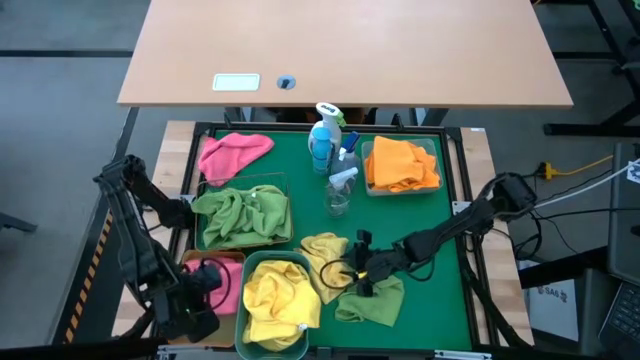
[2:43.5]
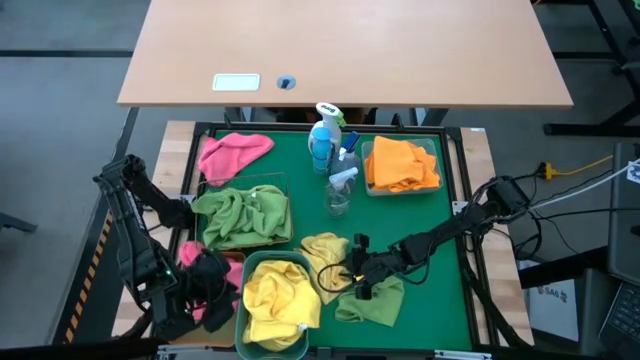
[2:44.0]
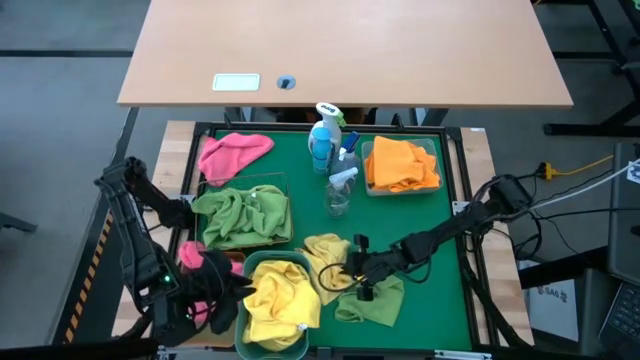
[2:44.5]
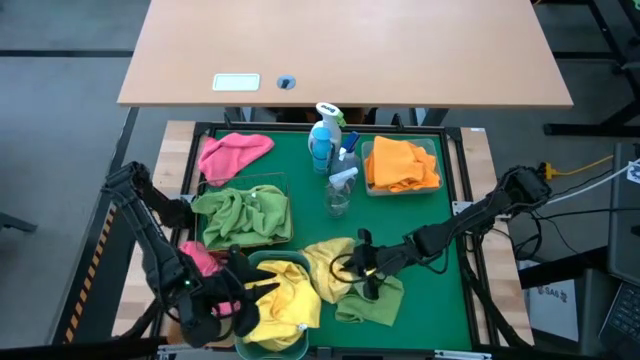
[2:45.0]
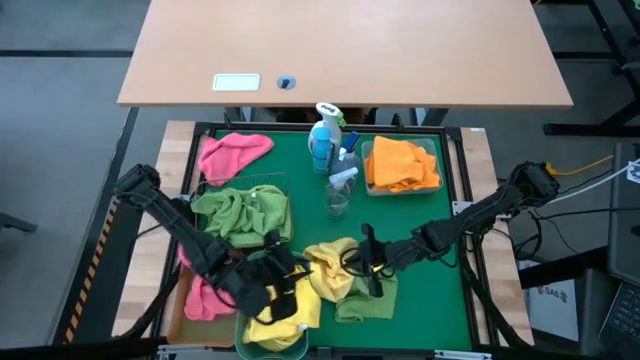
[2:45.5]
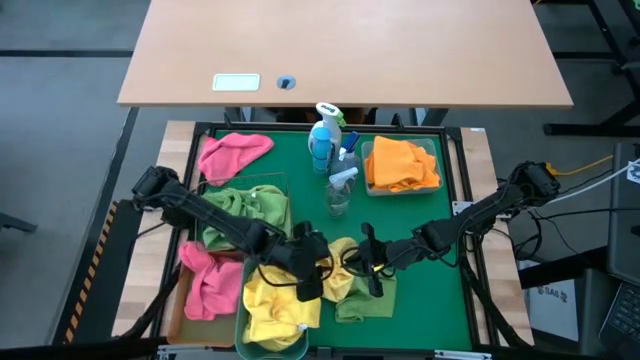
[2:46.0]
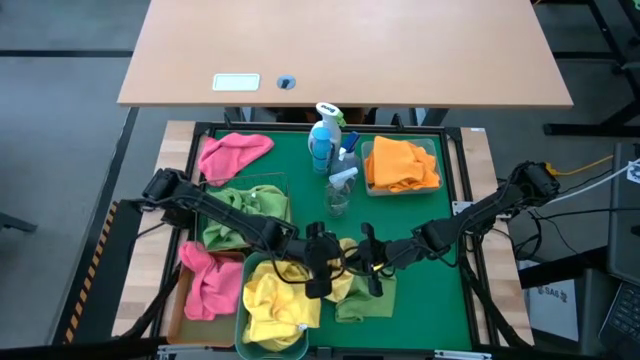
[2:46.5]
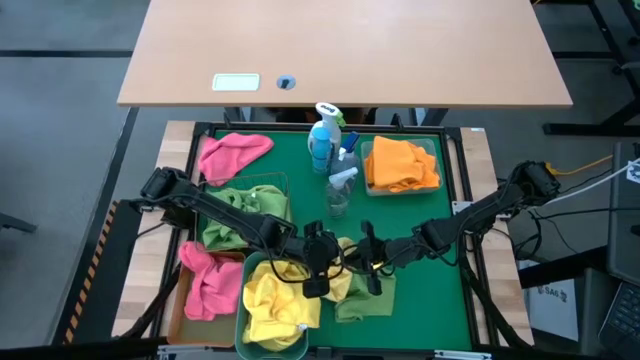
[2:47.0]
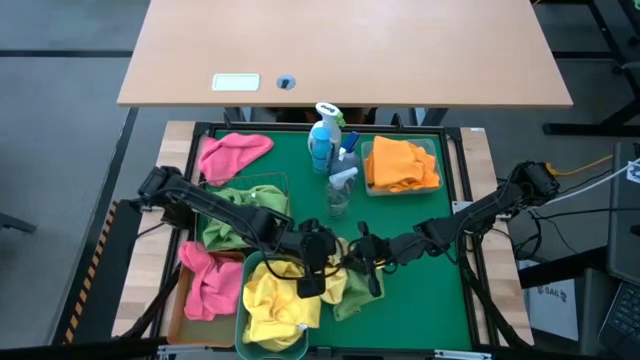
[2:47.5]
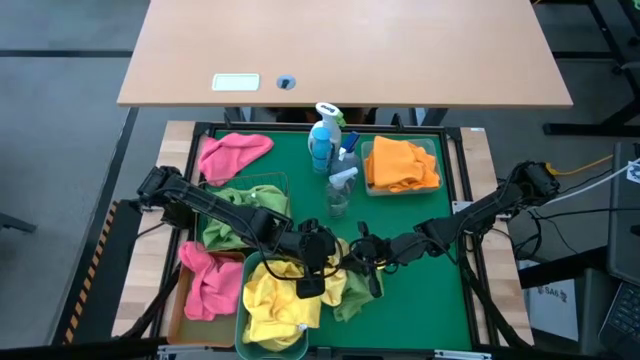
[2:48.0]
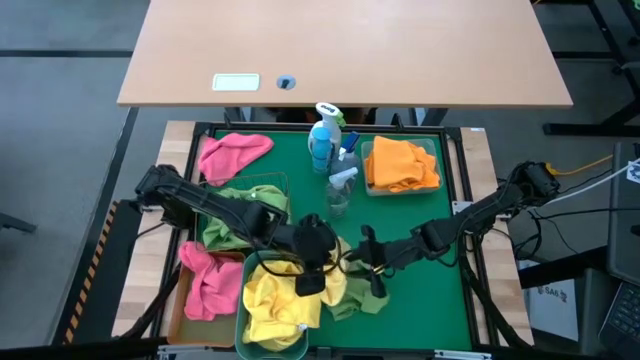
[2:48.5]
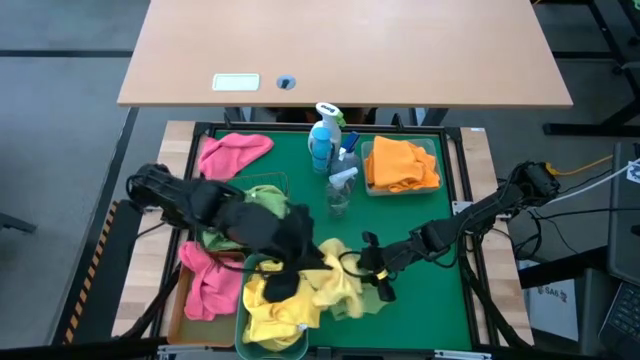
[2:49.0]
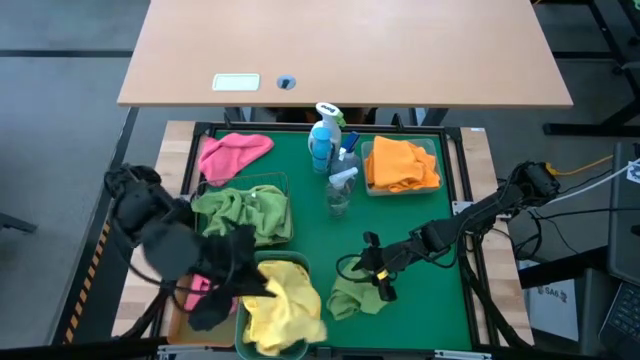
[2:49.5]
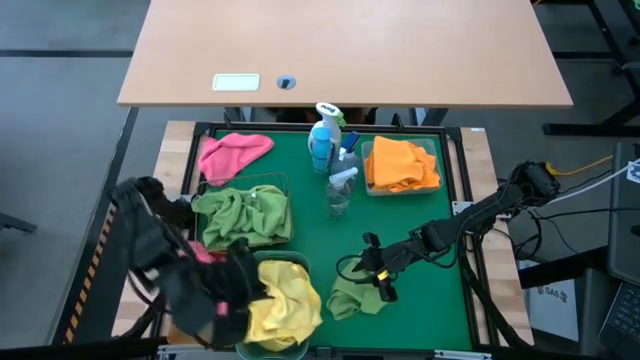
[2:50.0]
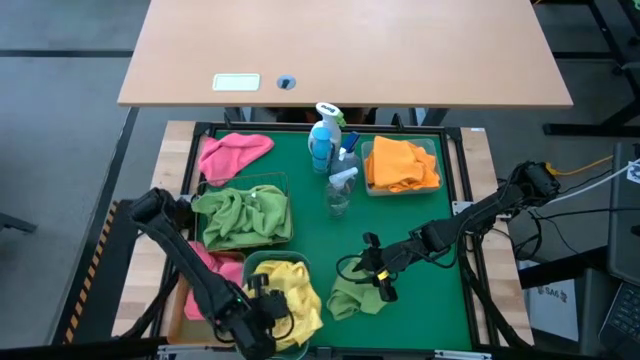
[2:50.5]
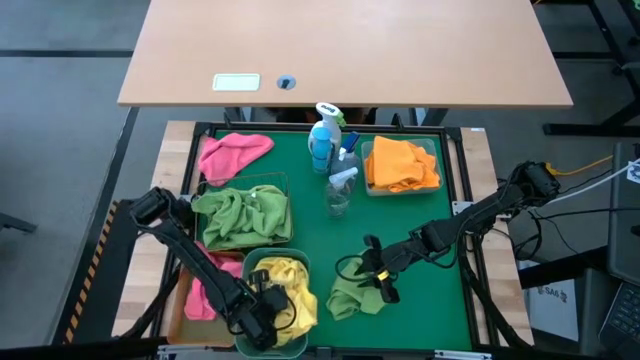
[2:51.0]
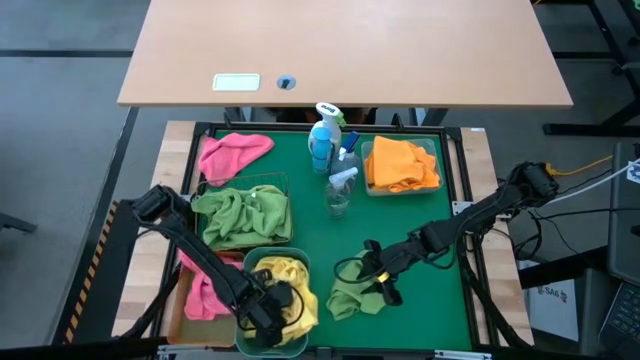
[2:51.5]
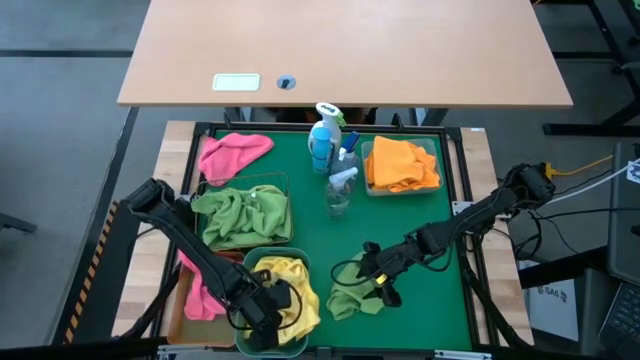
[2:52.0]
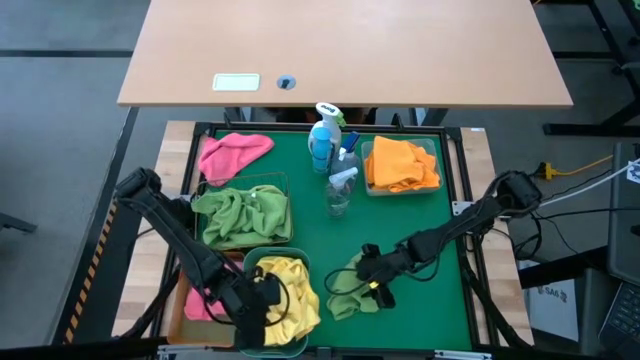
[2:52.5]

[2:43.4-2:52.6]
Task: Sort microfiber towel by color & place in baskets
Put the yellow towel into the blue bin

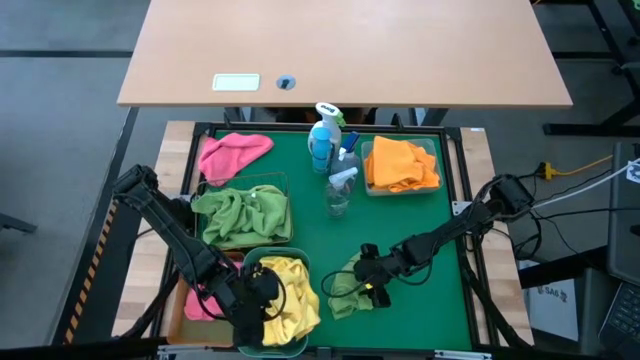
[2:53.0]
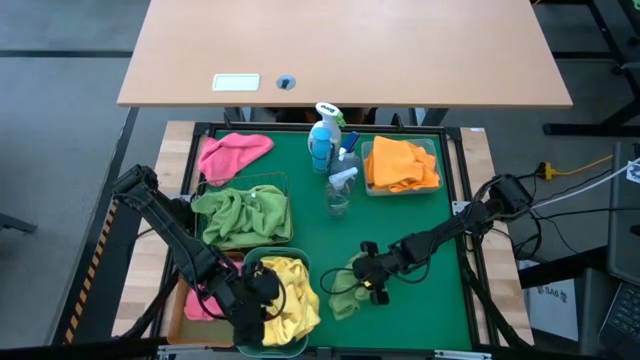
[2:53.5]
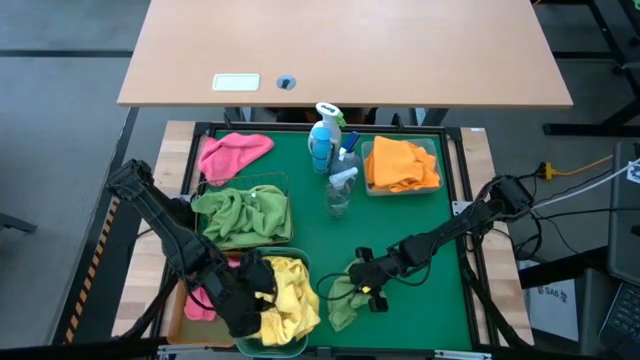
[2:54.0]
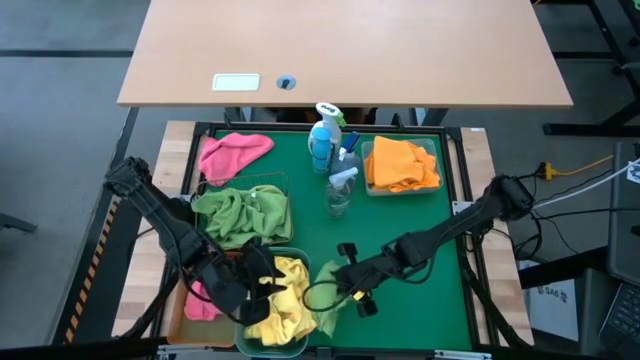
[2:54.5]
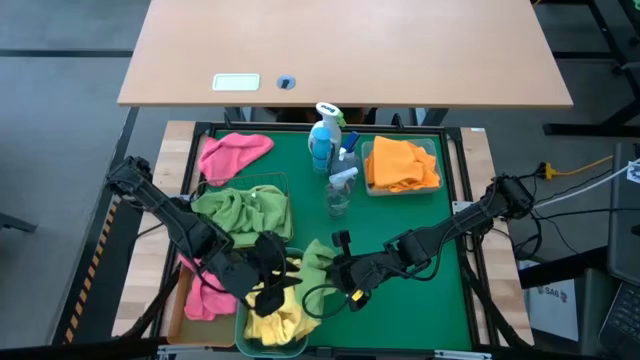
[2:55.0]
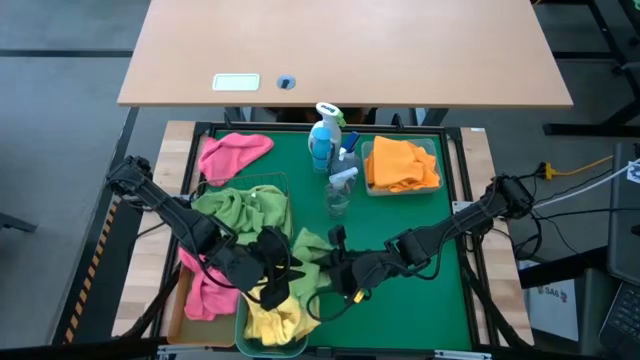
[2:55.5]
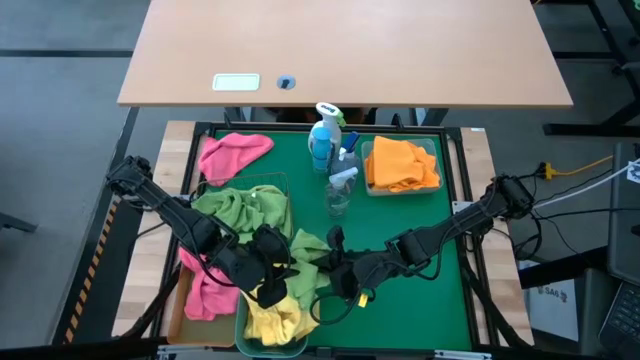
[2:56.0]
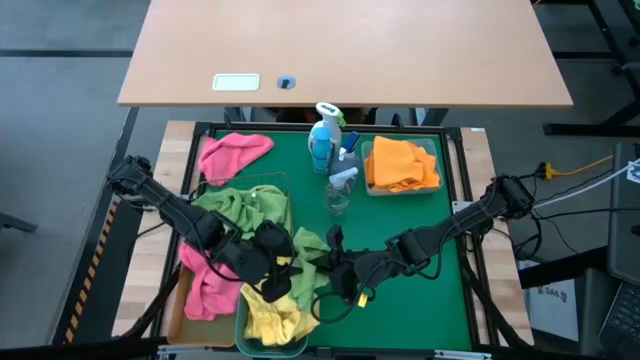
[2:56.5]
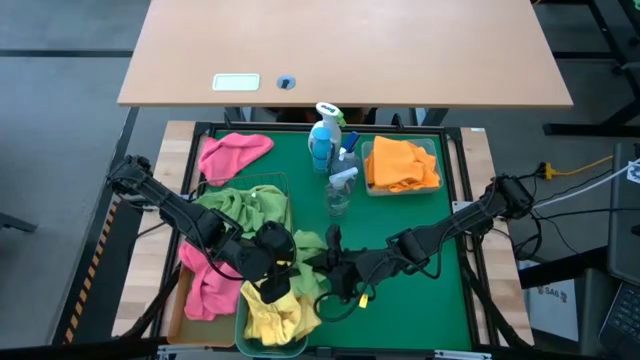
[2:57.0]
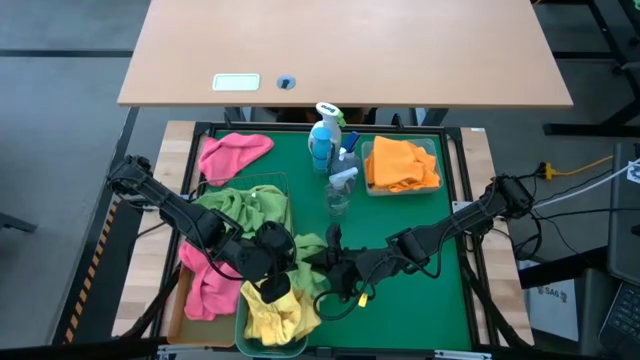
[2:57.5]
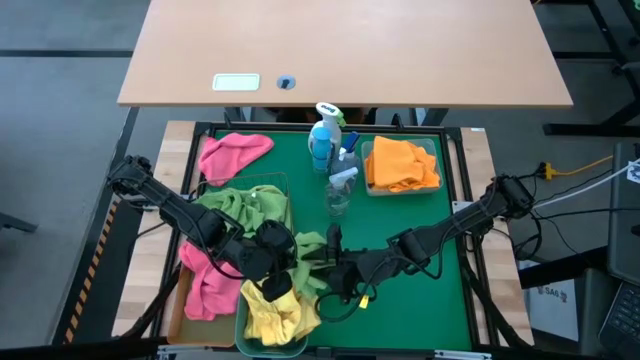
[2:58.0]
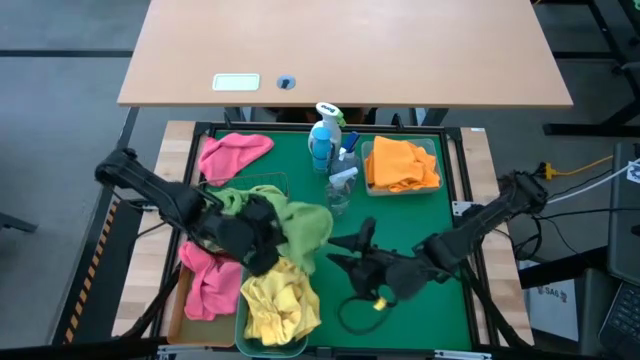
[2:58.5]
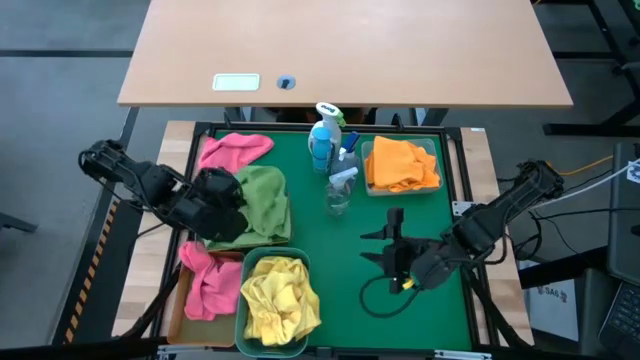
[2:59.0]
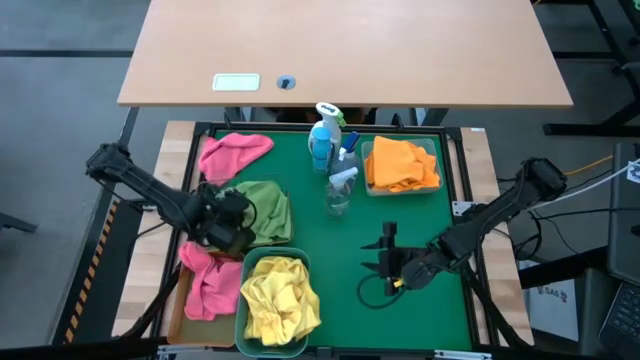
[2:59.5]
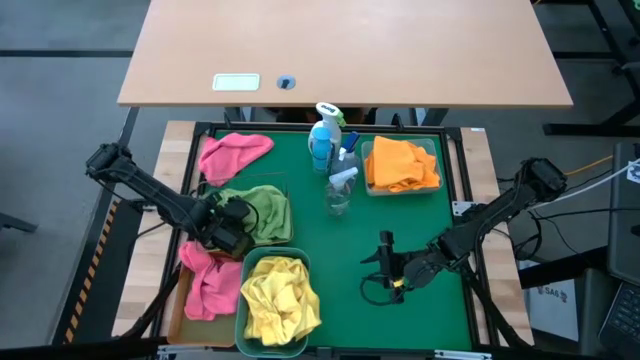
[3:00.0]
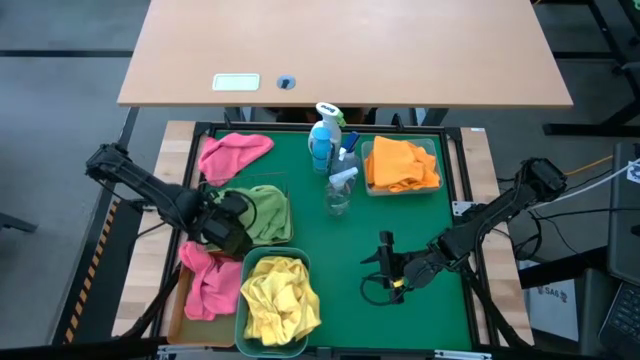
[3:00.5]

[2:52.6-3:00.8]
Put the green towel into the wire basket

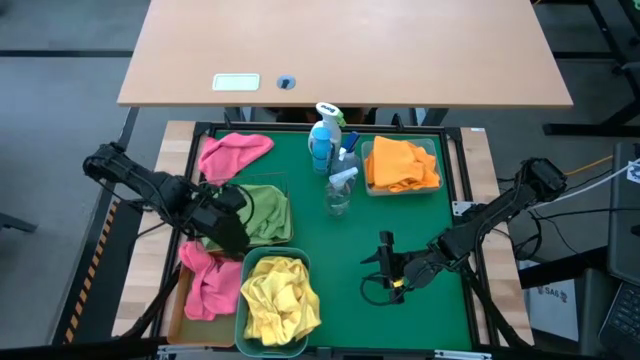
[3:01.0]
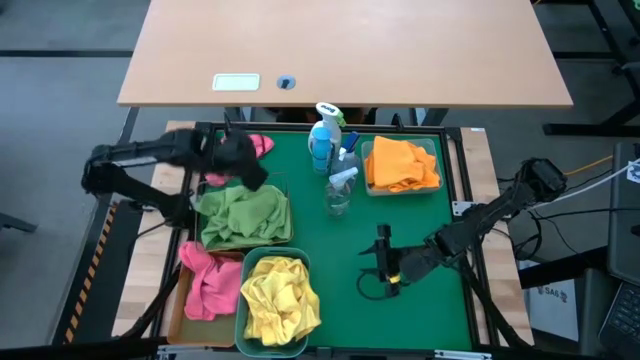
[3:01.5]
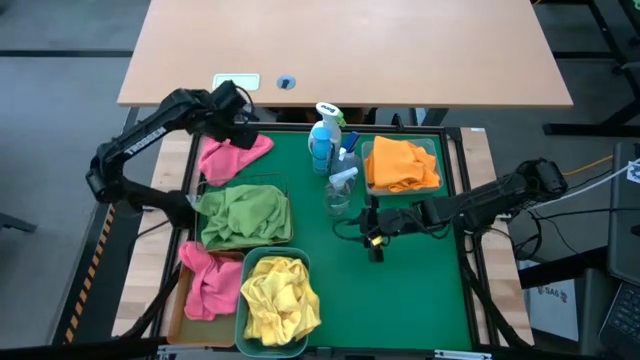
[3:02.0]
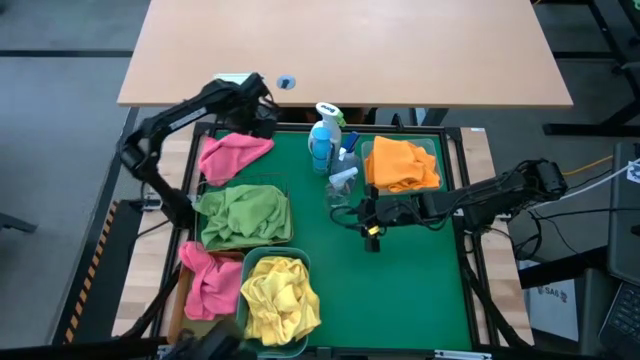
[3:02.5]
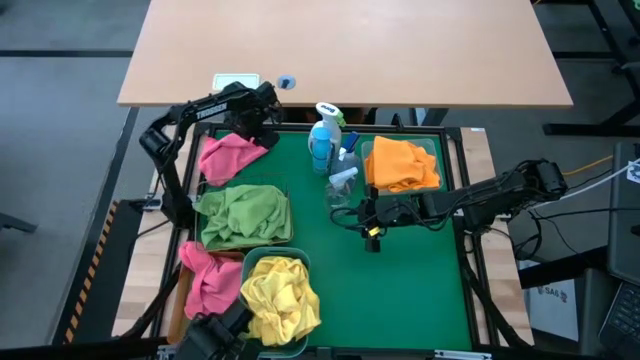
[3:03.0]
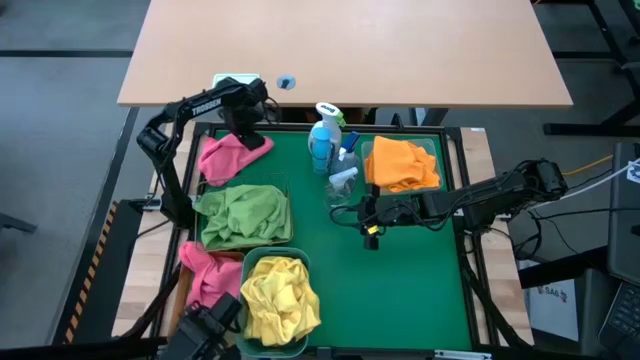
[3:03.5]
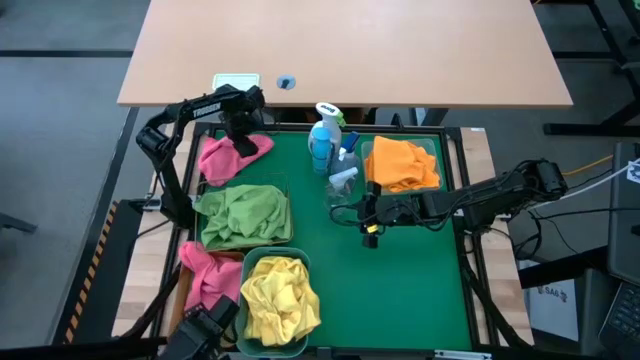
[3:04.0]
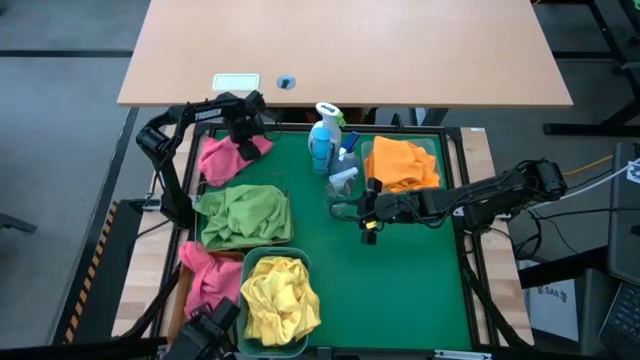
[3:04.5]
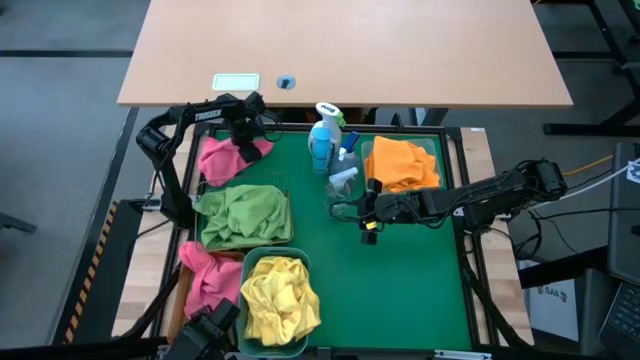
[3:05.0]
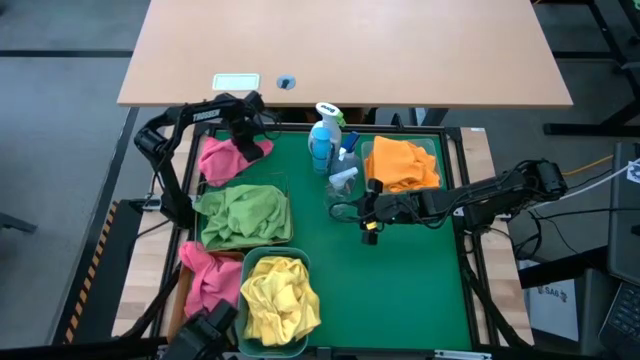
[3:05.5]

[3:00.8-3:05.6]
Put the pink towel into the orange bin
